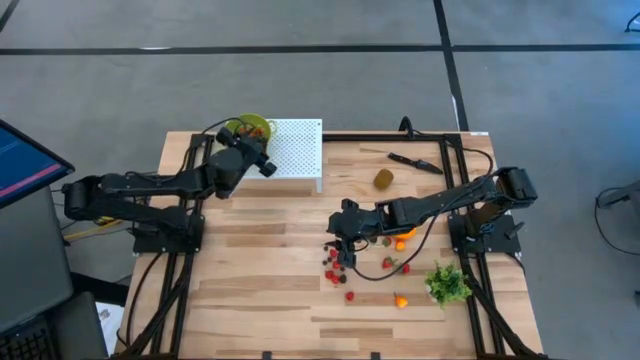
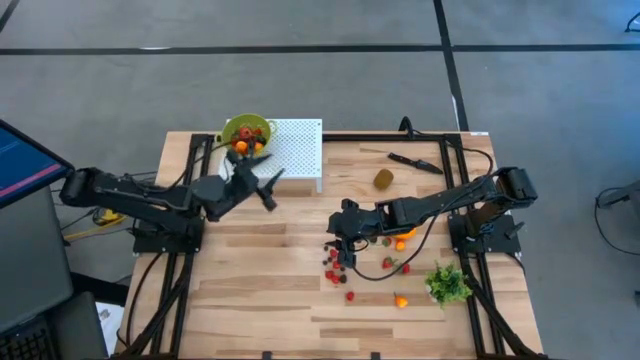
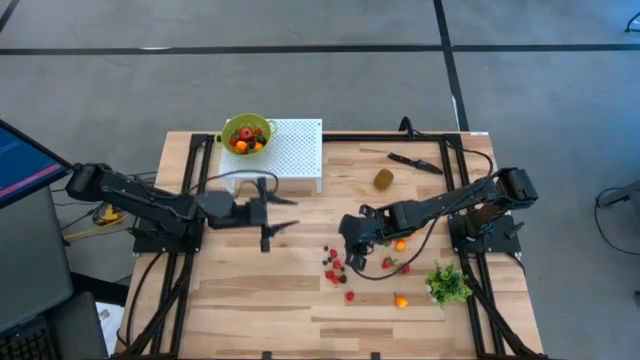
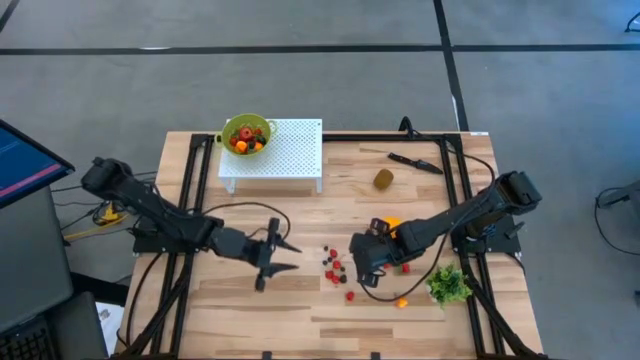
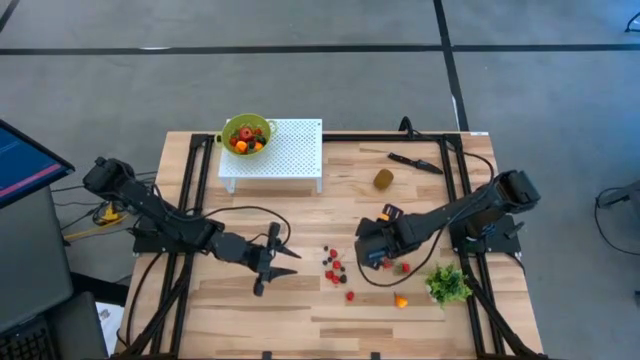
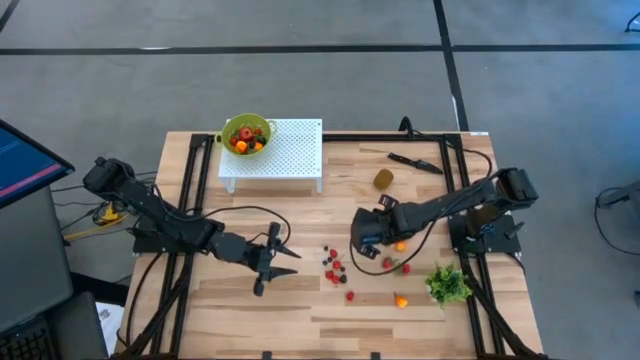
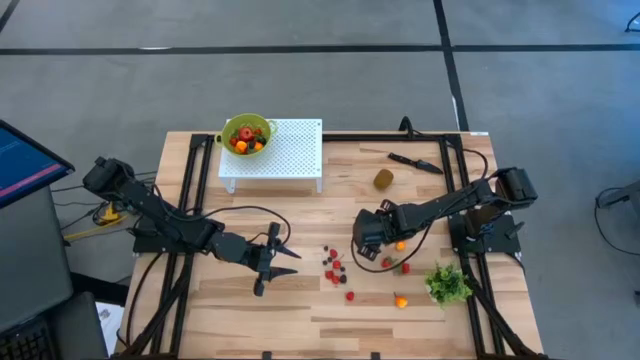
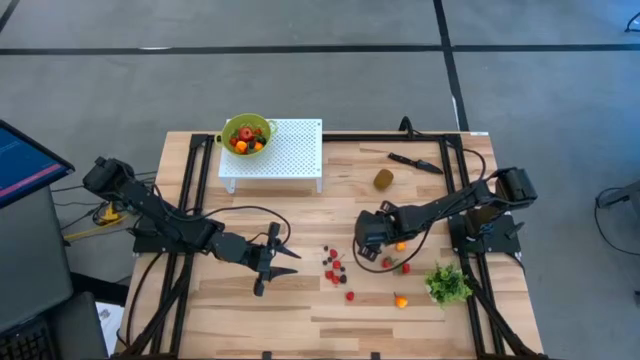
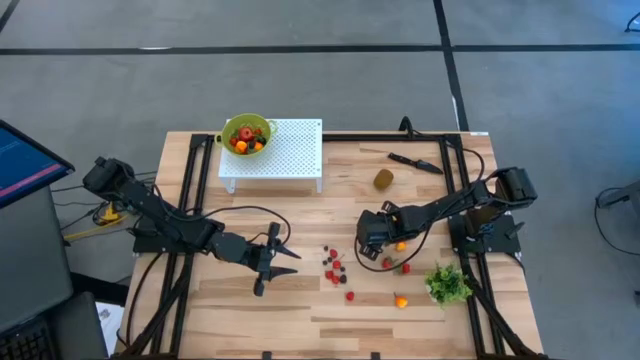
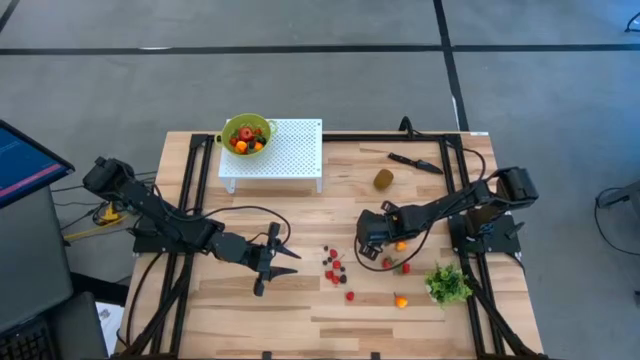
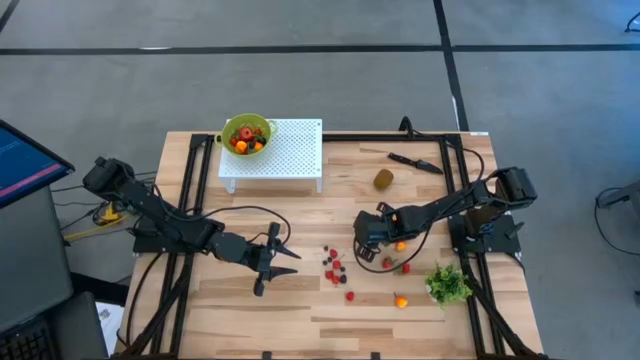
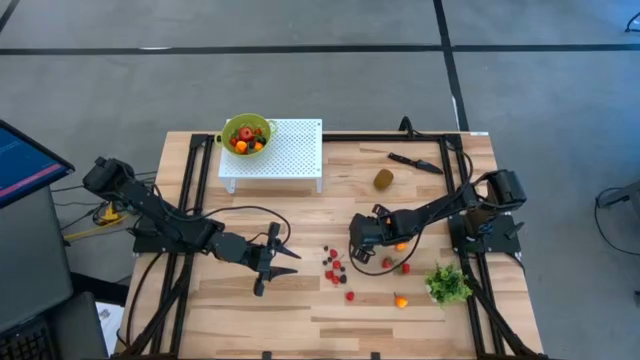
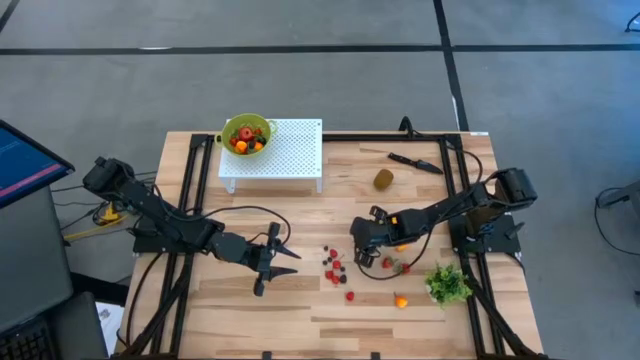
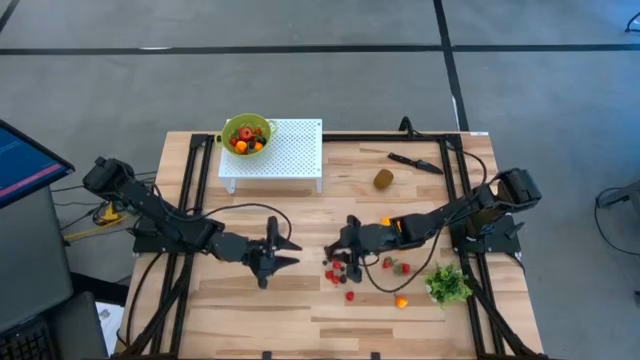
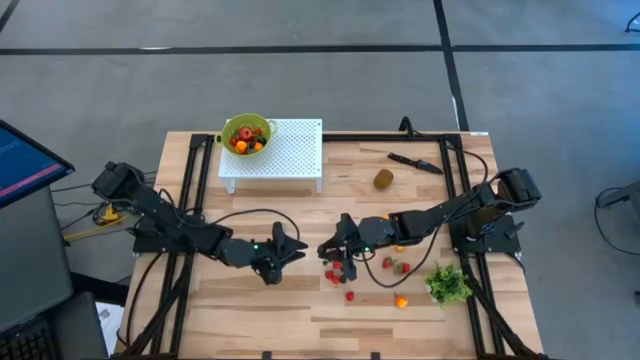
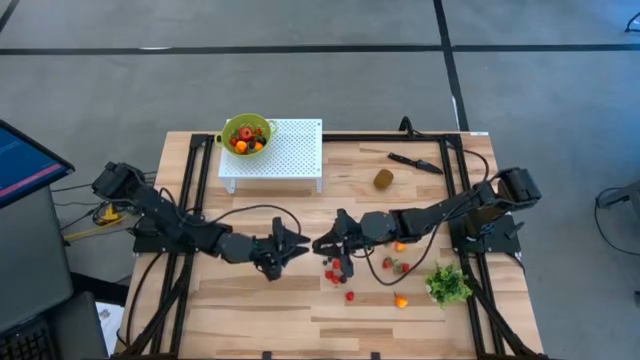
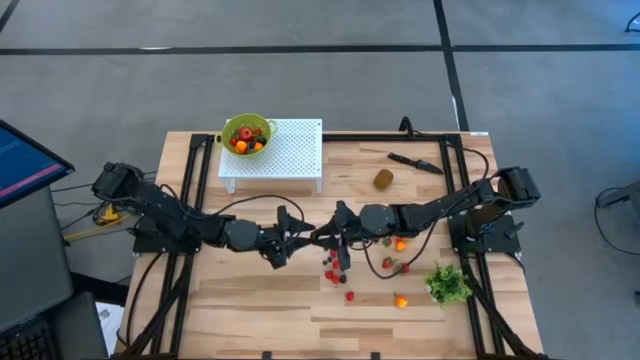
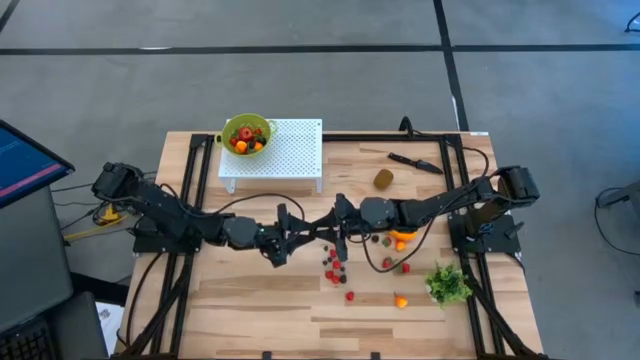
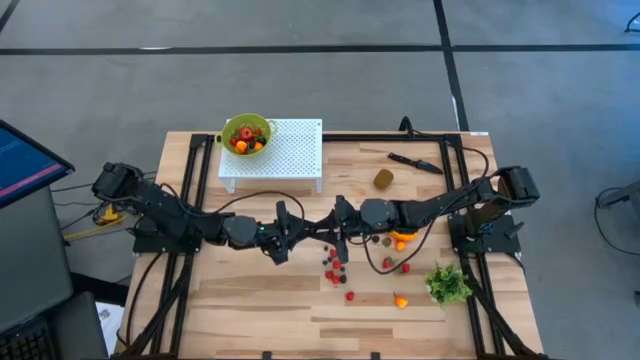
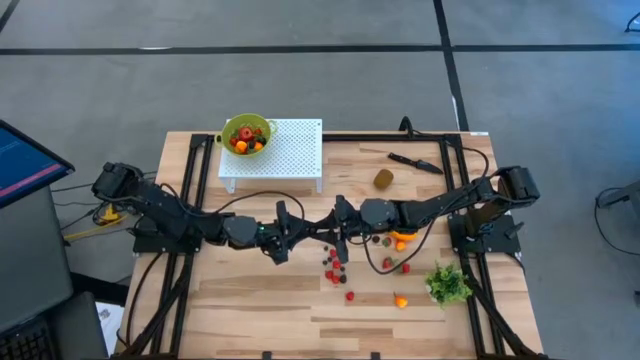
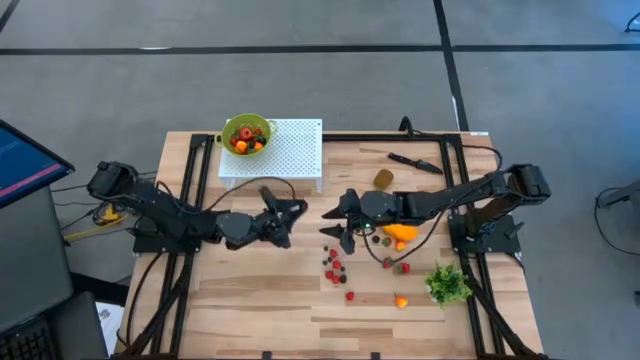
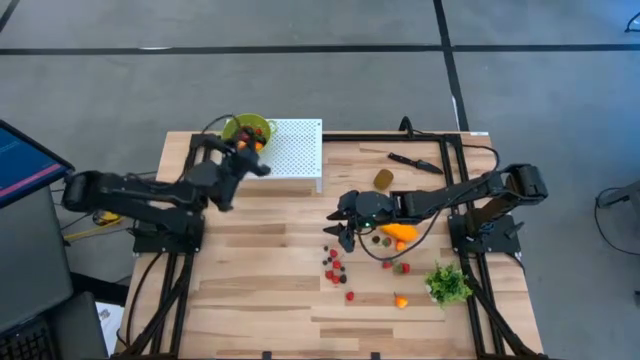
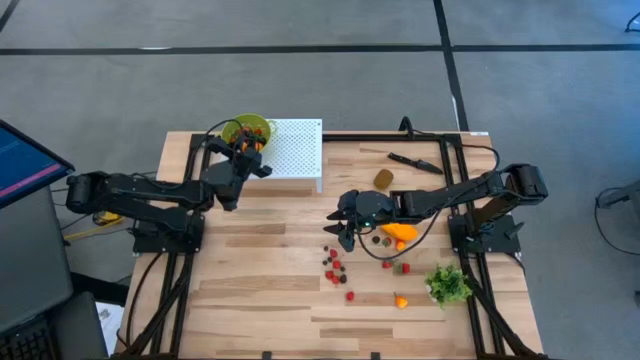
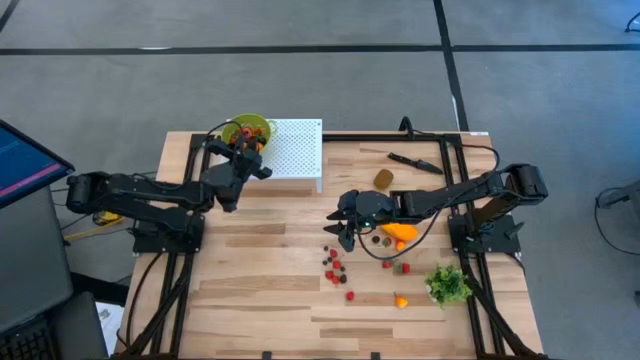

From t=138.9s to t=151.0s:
Task: Pick & Place Fruit
Put the black cherry into the green strainer bowl on the shelf

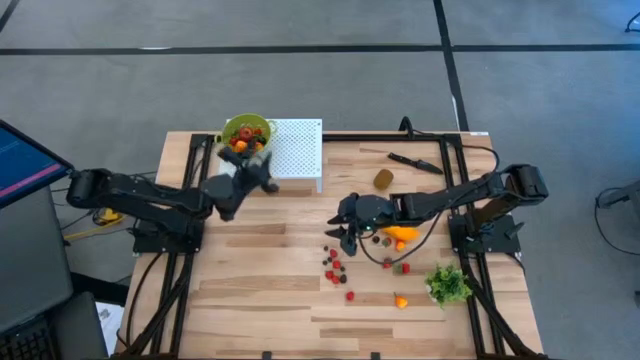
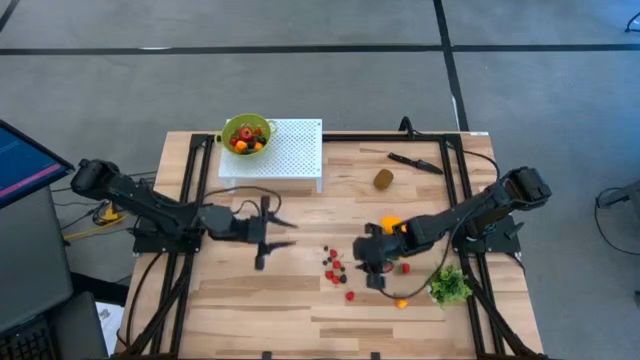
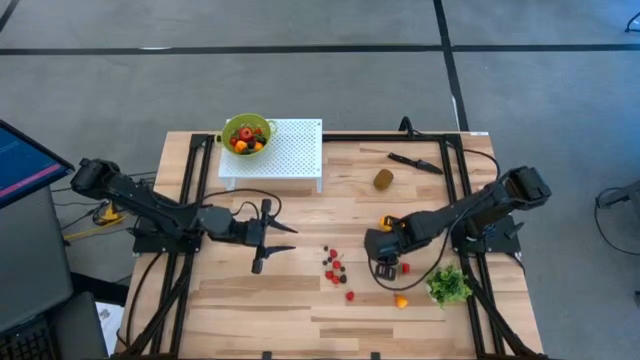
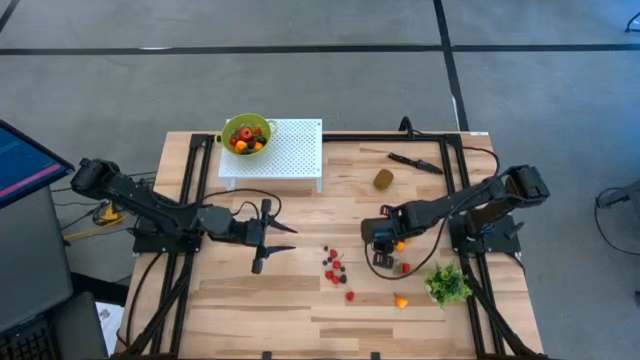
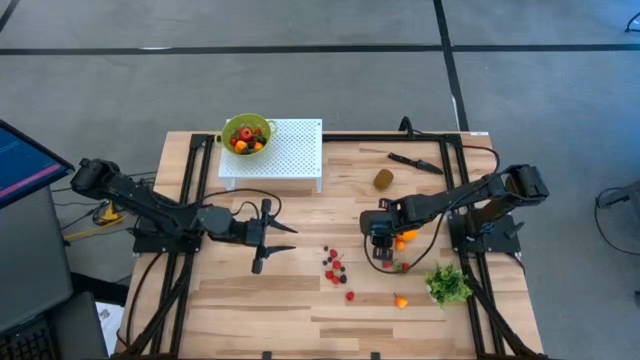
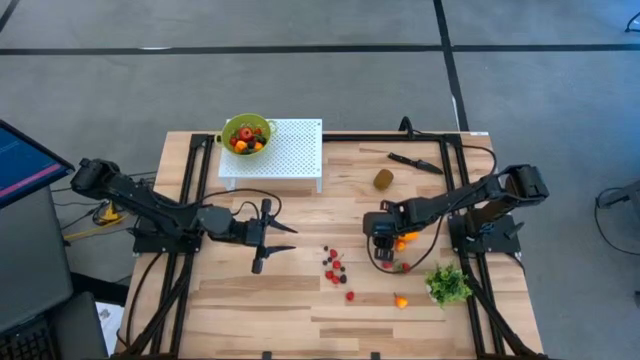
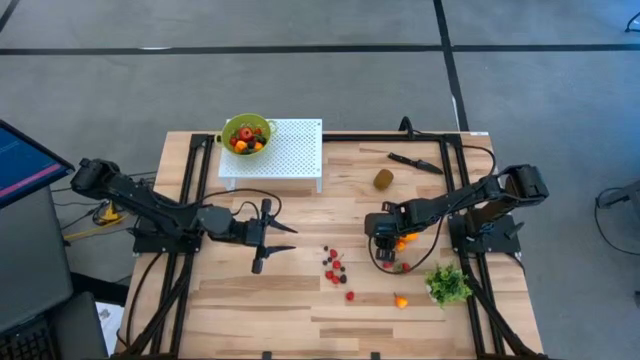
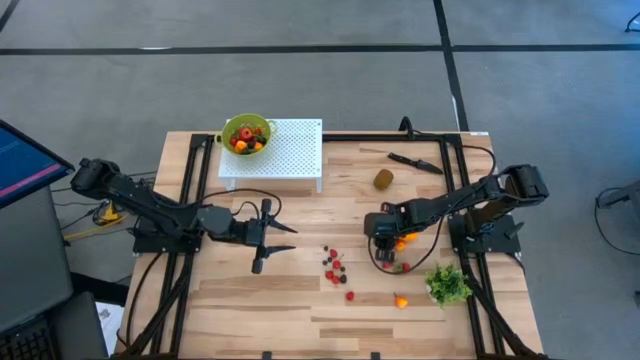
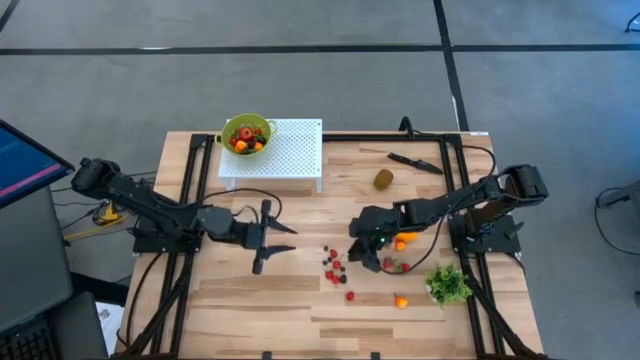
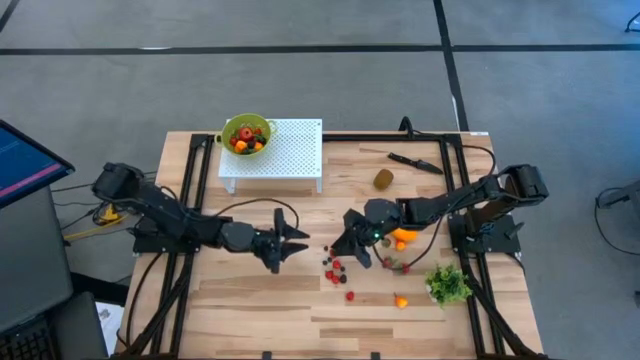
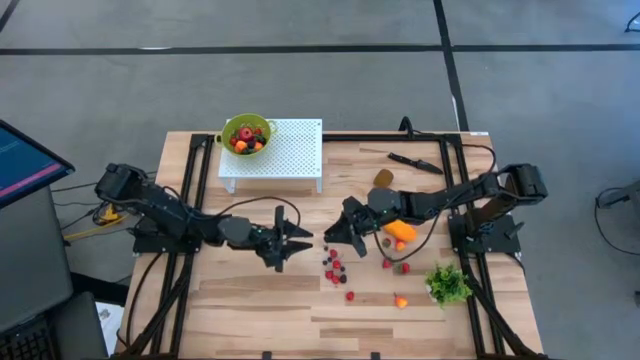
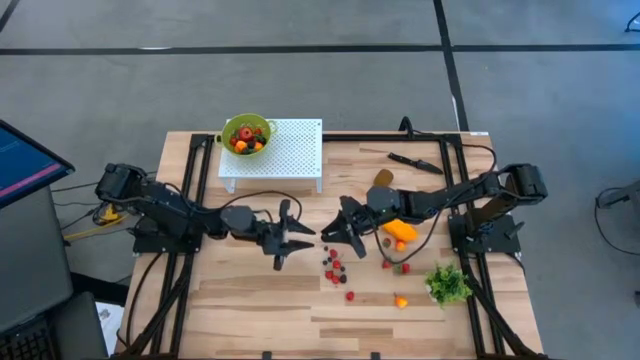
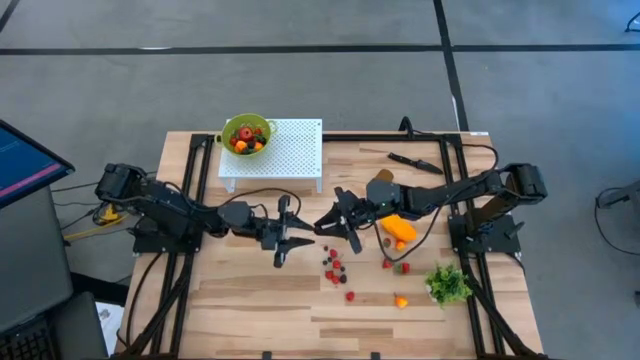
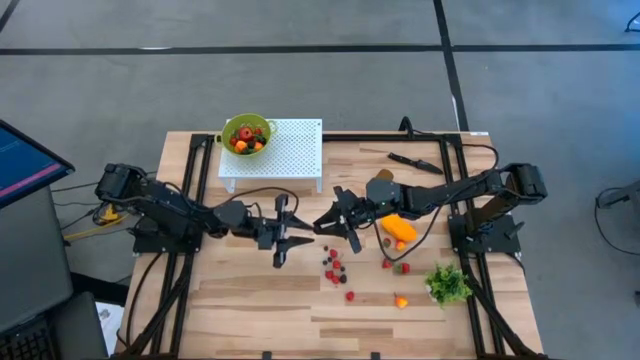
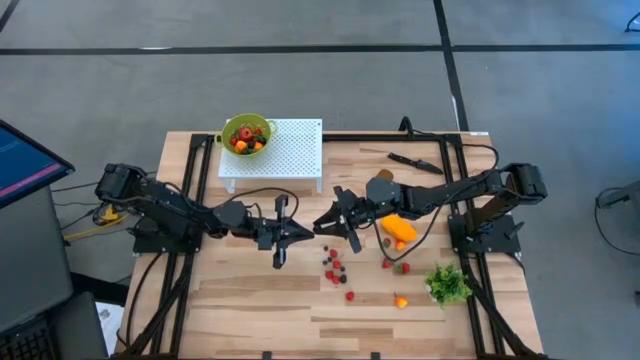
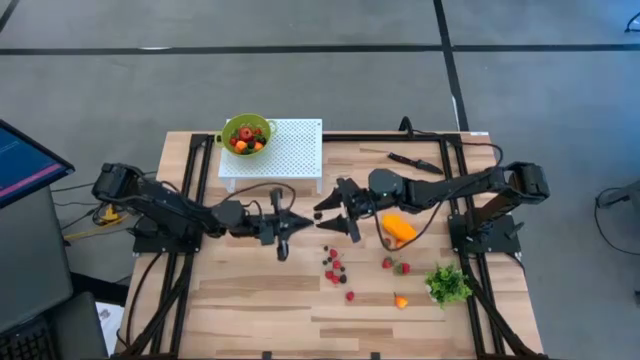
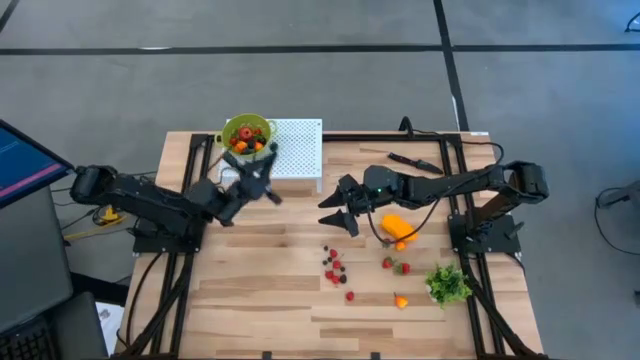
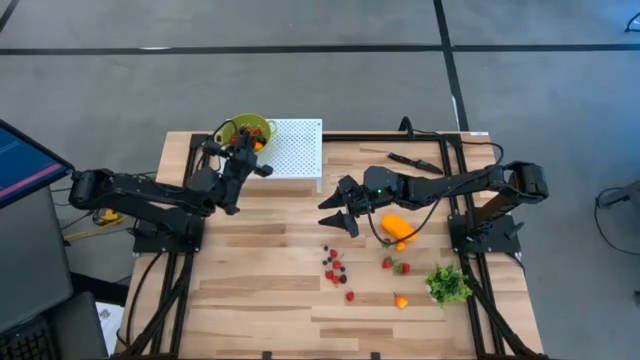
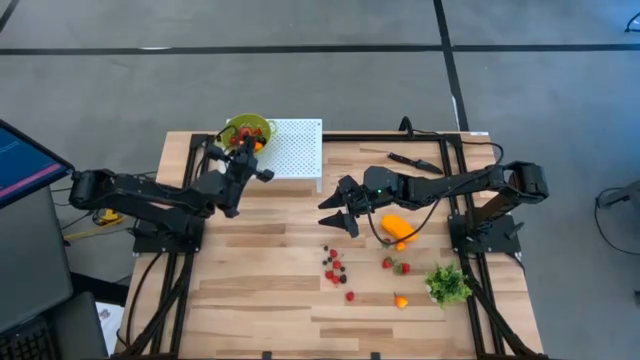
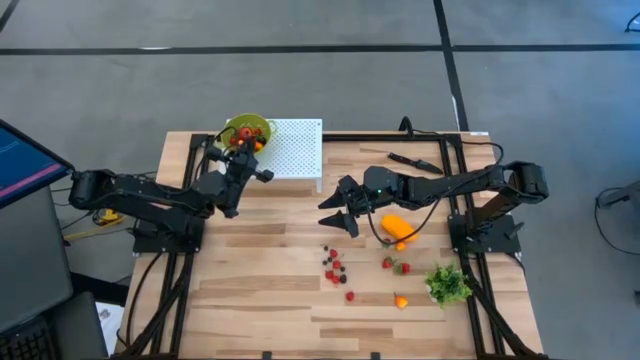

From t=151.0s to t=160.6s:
Put the black cherry into the green strainer bowl on the shelf
